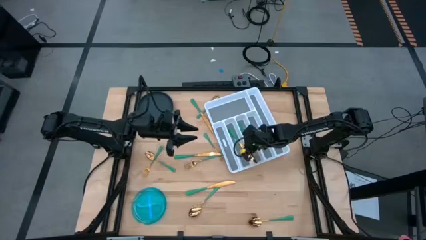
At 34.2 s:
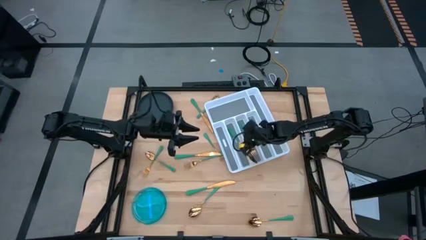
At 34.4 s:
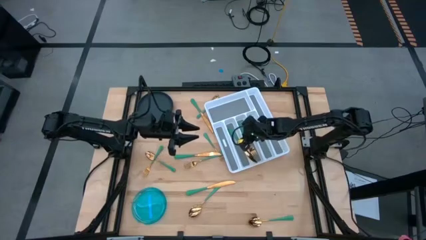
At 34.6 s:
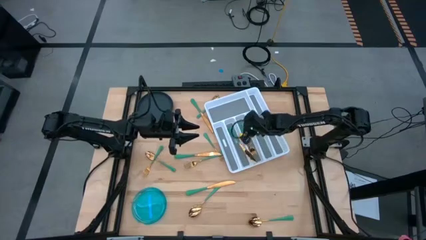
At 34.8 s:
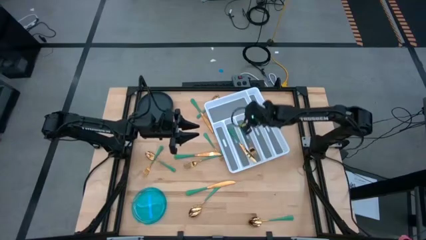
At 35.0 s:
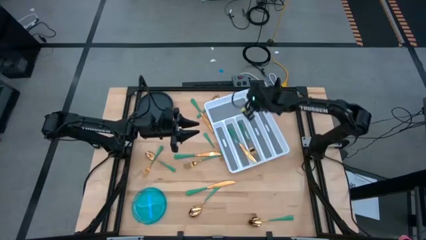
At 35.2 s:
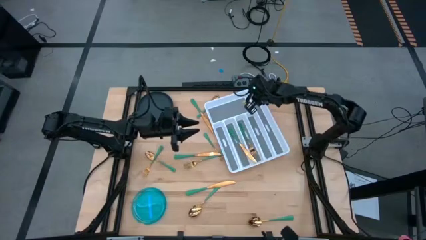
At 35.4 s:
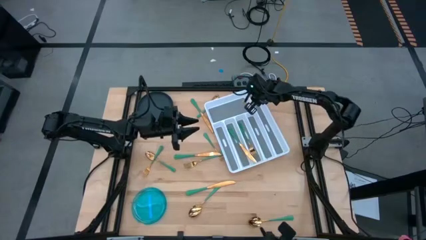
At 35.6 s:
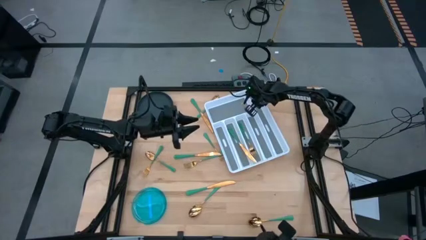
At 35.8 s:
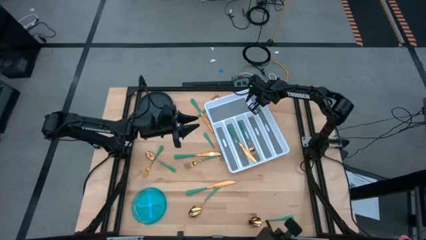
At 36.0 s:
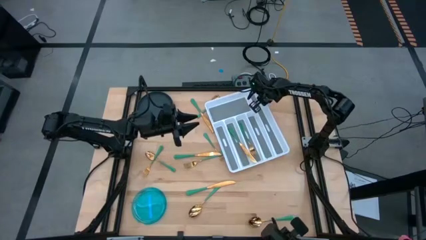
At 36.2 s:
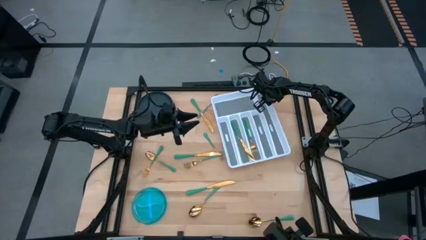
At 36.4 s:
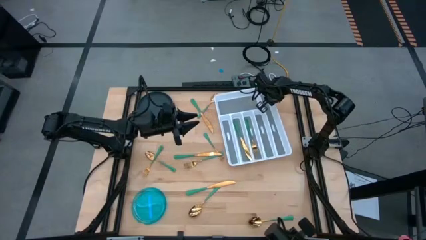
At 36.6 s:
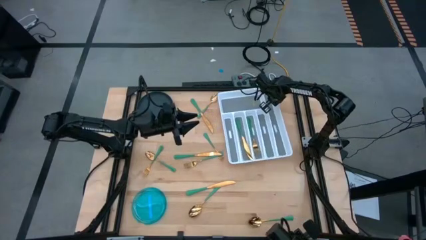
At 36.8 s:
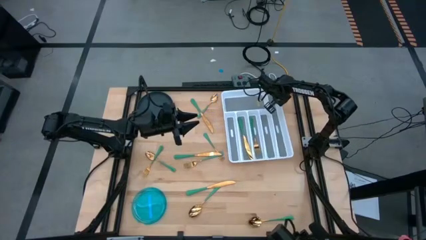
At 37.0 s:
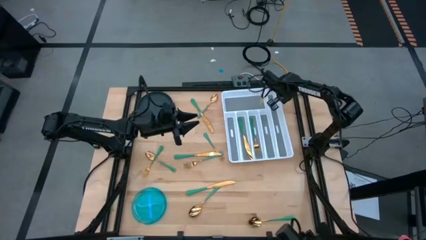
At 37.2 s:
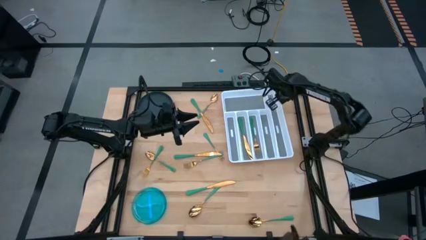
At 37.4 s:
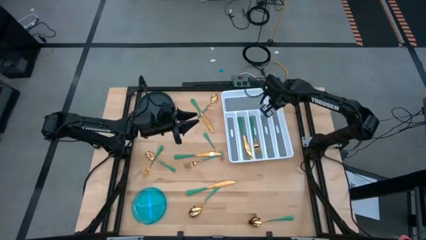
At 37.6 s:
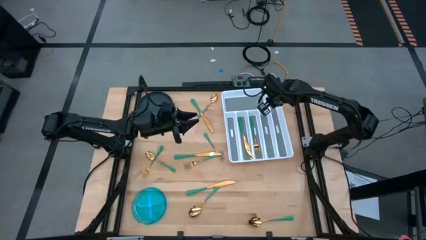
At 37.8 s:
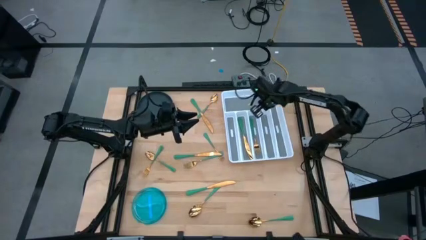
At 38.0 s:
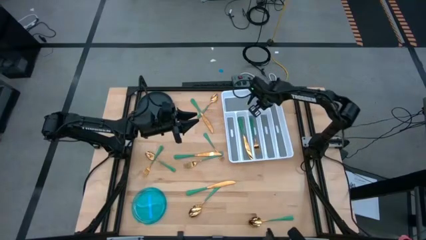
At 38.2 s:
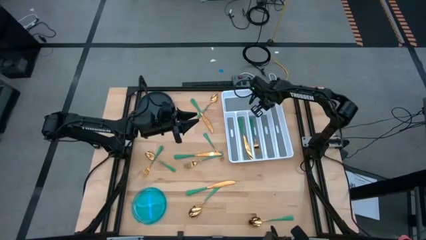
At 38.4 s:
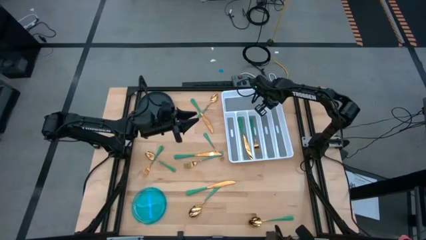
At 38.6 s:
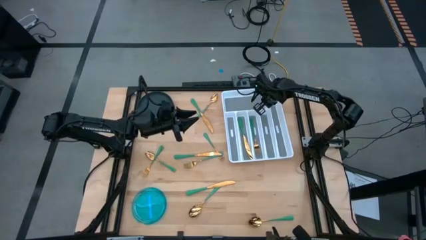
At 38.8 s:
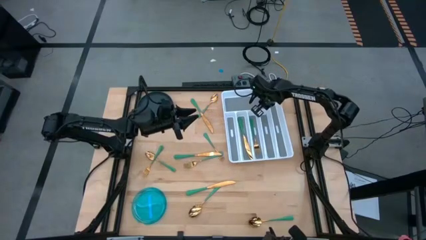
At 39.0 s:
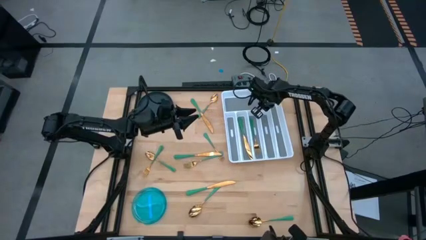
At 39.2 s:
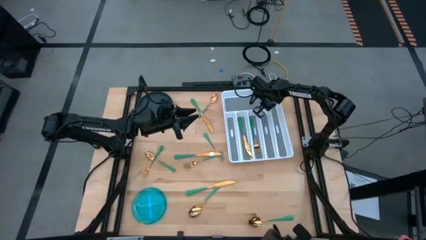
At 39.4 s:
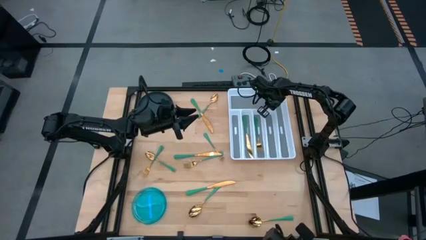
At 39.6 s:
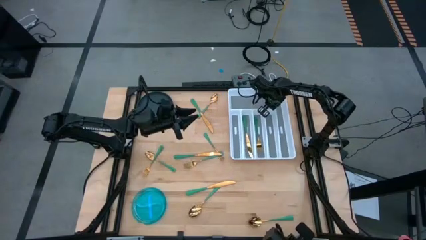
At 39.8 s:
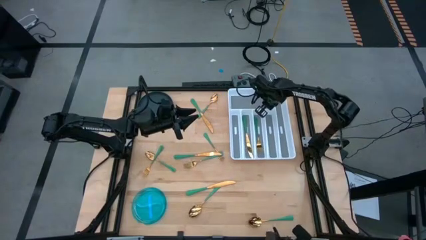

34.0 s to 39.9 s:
Task: Sort silverware
Adjust the white silverware tray

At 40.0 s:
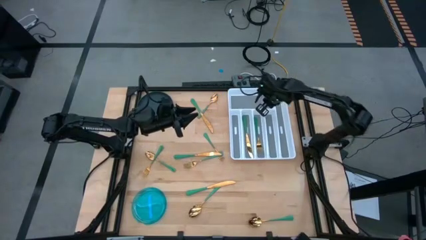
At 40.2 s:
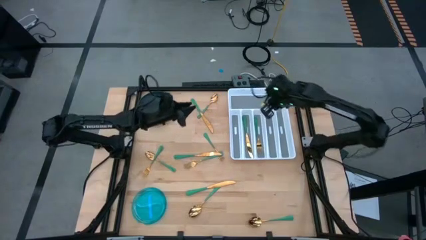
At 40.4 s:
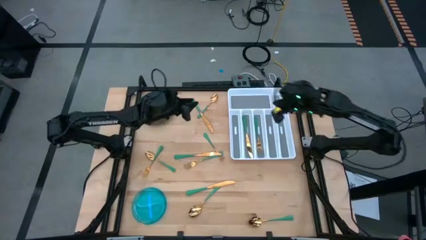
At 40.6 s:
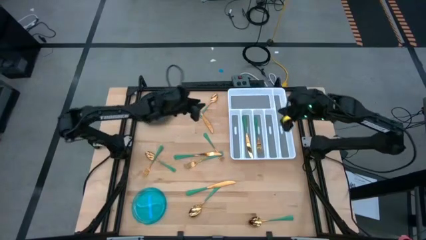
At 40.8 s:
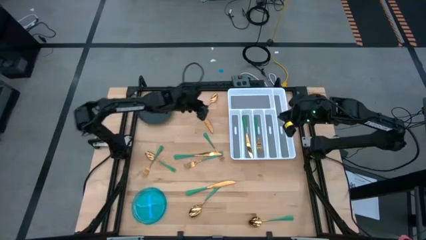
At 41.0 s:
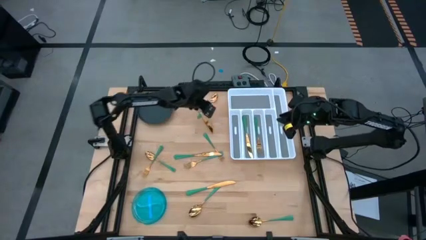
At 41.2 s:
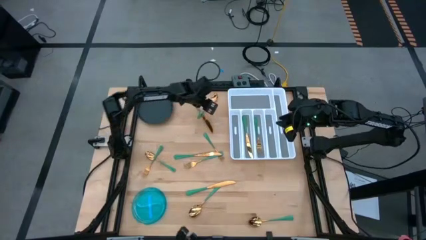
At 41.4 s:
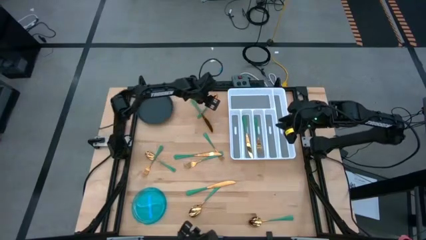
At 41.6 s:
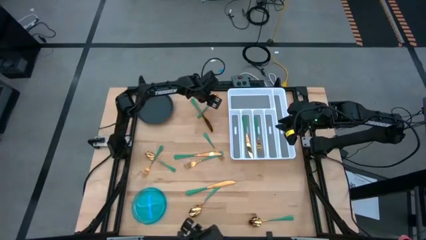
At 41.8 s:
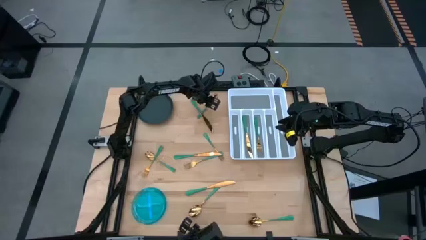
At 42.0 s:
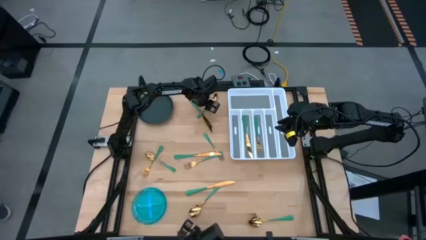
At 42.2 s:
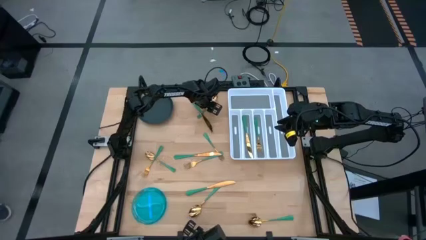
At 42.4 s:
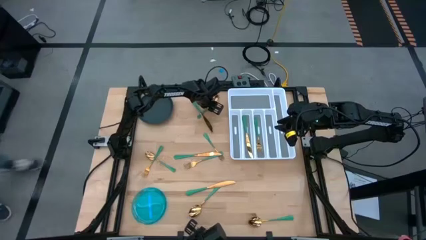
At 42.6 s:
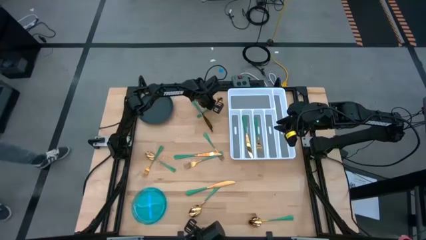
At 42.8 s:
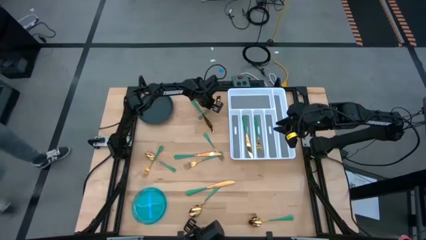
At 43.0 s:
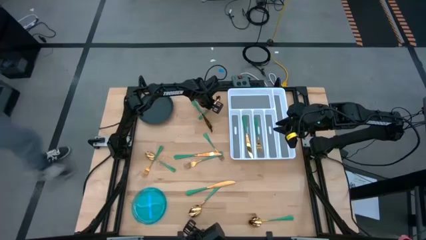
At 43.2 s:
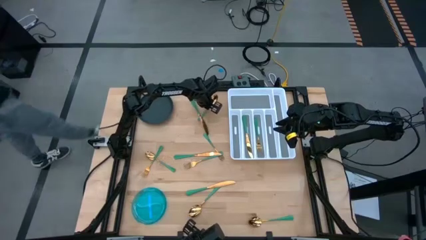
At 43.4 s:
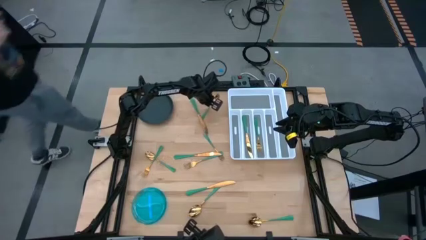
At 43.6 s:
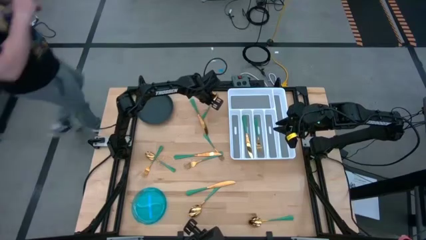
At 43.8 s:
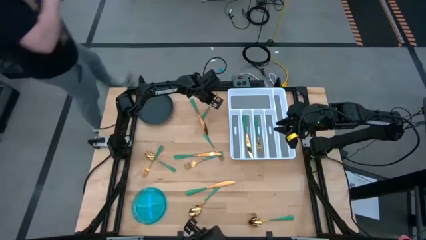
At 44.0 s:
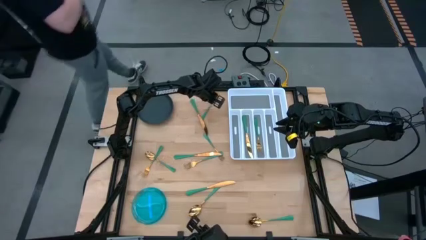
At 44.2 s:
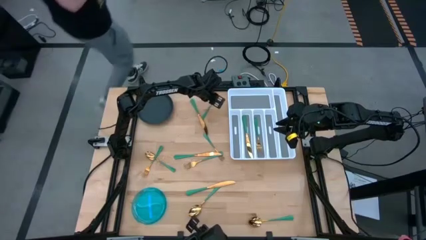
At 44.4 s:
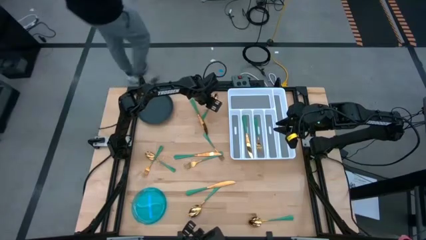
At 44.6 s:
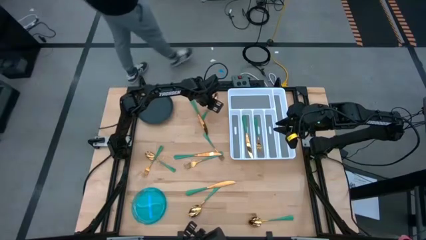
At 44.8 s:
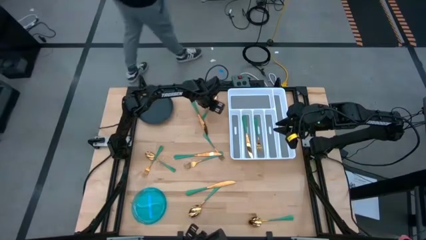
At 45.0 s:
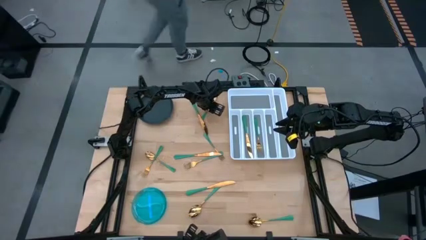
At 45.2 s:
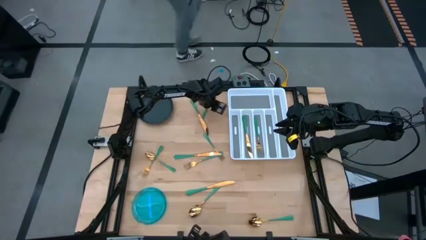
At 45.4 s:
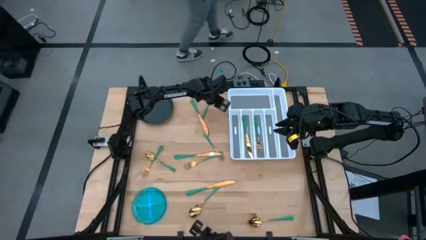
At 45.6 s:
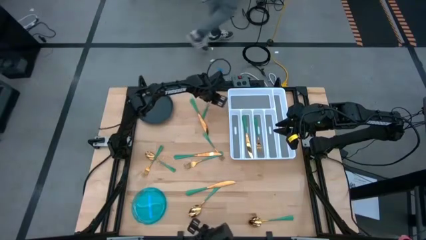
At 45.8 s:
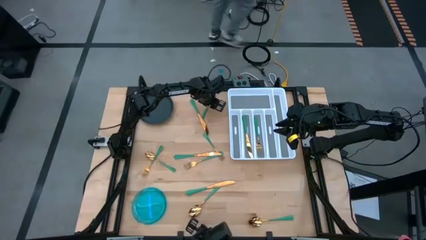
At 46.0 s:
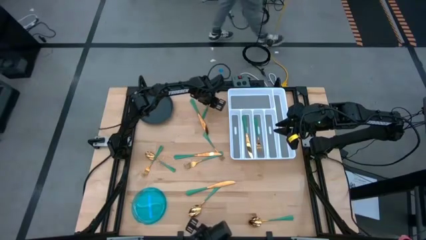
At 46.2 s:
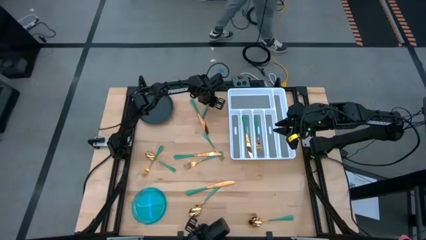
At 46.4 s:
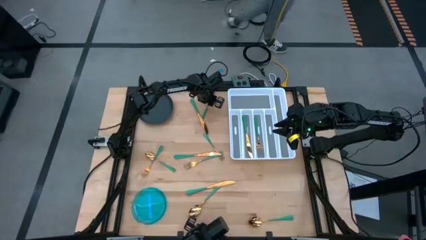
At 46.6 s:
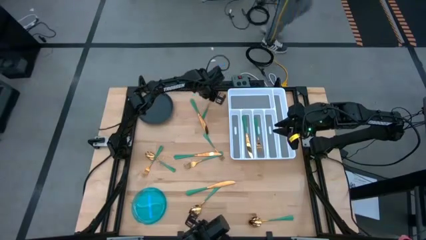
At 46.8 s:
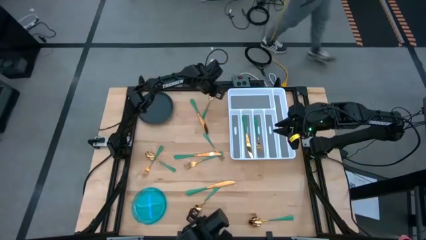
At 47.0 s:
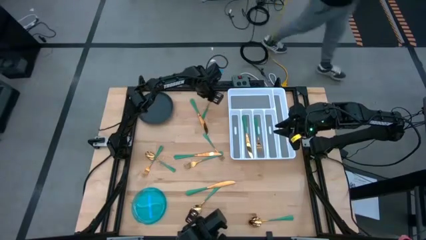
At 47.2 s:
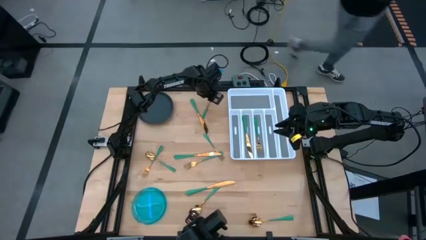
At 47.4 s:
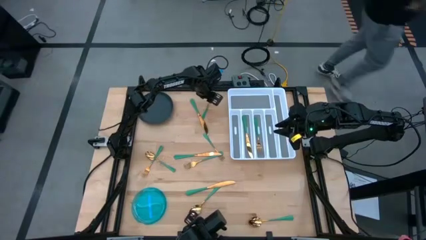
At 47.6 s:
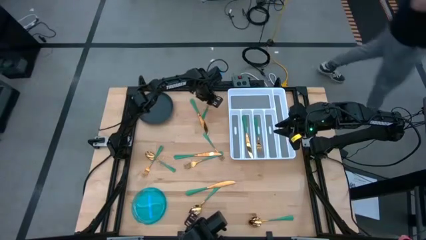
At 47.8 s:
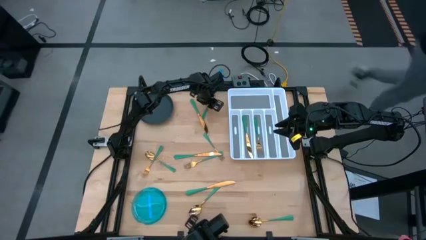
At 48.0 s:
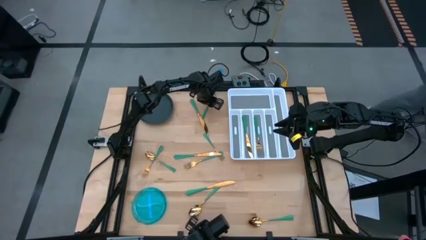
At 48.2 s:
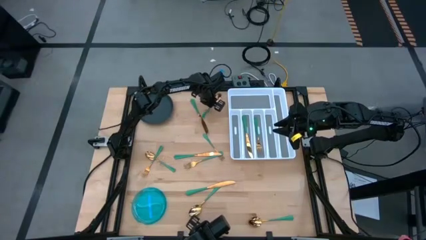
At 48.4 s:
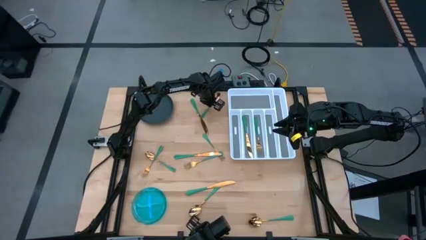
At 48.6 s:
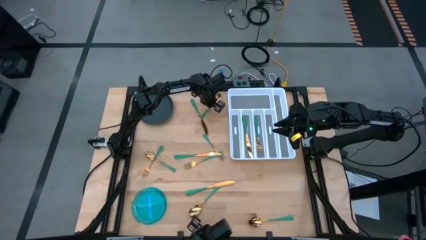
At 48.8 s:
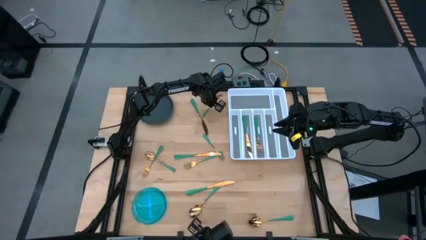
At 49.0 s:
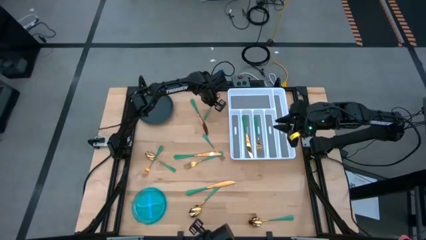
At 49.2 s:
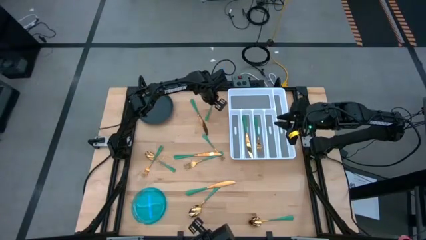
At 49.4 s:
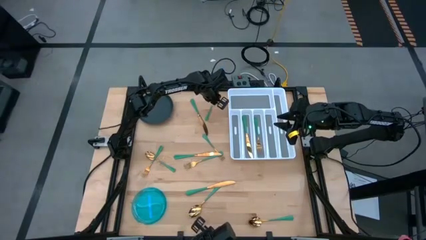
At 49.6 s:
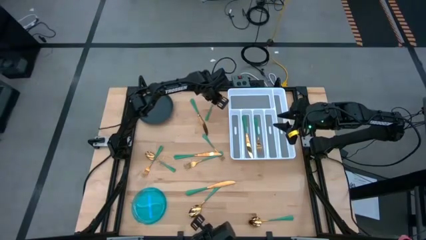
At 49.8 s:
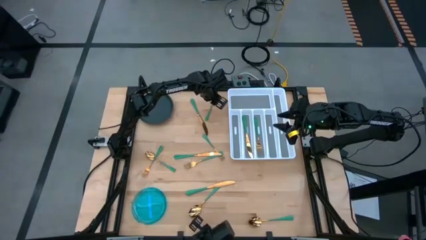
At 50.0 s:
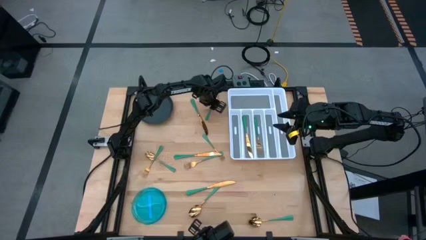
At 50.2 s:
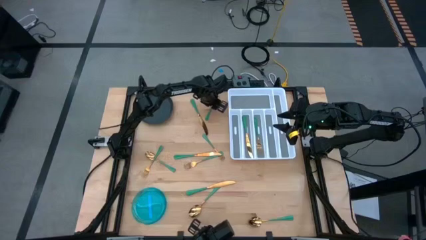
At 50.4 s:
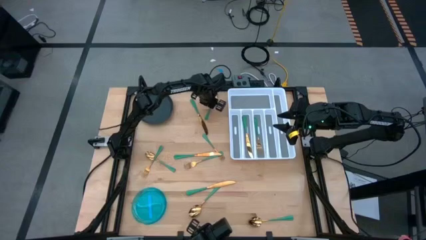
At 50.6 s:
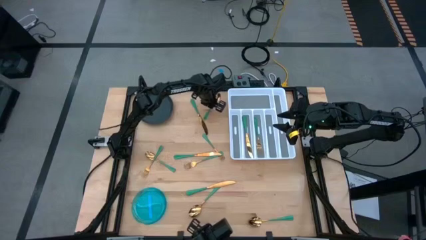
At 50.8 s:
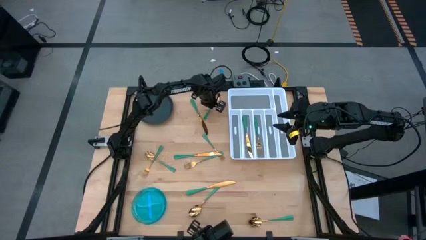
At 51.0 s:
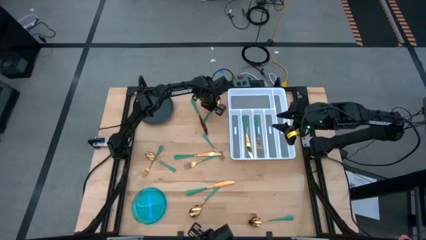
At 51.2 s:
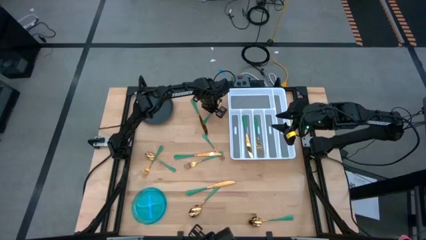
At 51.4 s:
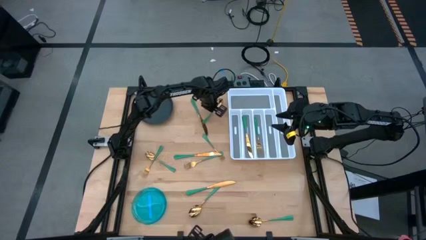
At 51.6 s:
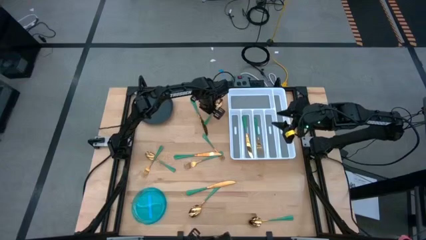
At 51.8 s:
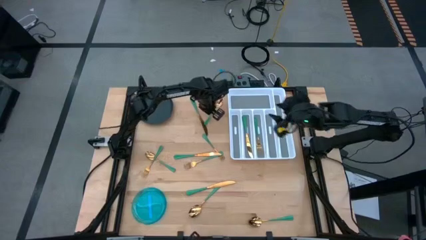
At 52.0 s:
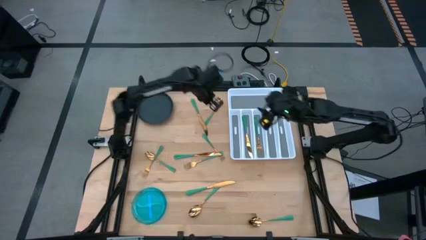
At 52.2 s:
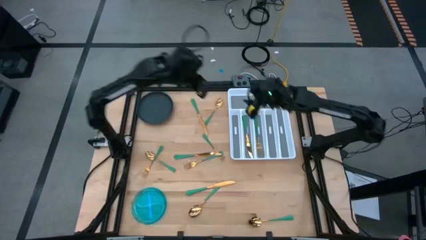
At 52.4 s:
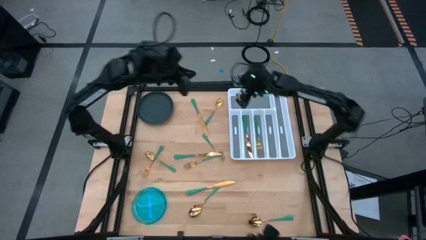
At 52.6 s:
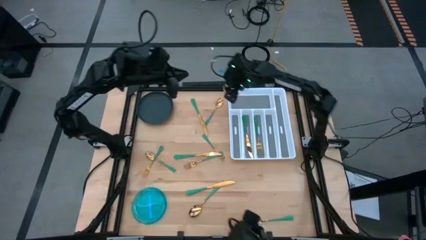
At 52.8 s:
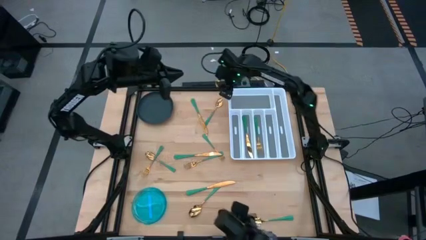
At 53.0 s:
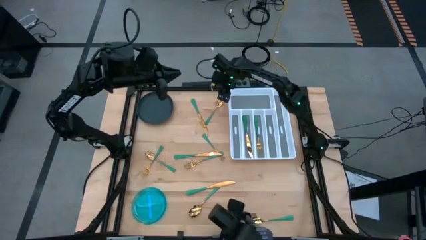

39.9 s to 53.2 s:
Put the top center green spoon into the left slot of the white silverware tray
